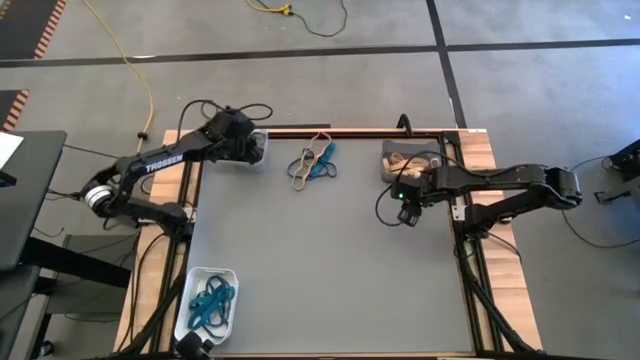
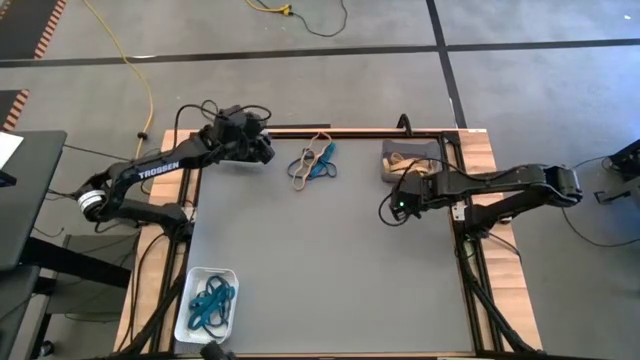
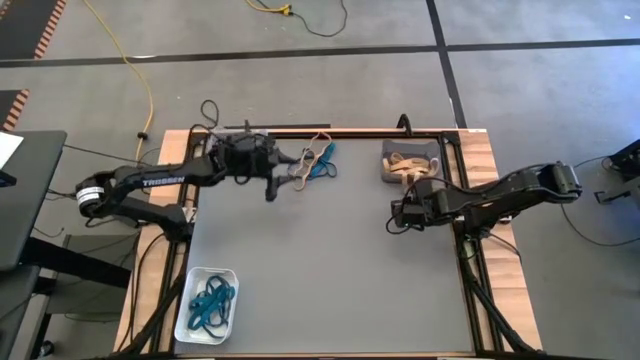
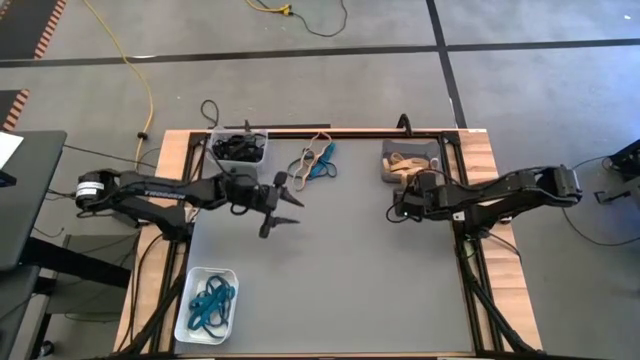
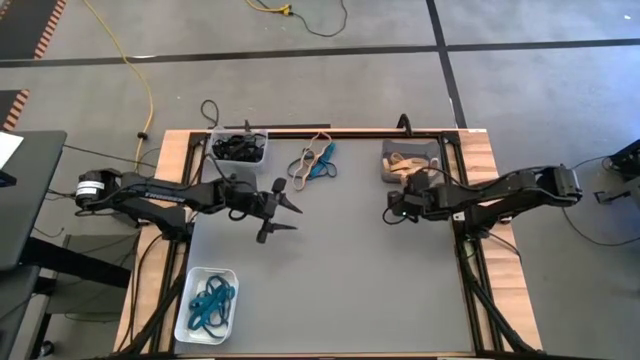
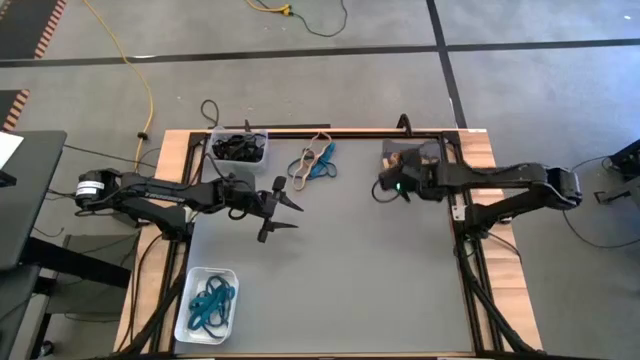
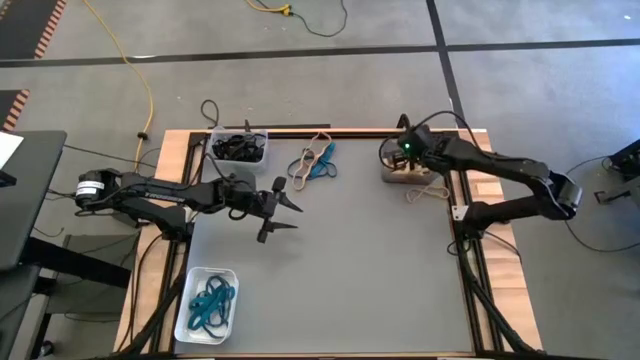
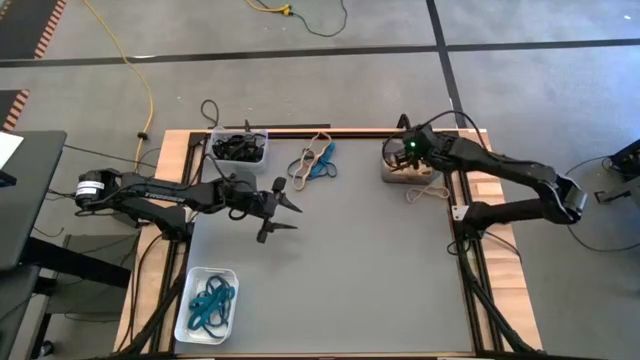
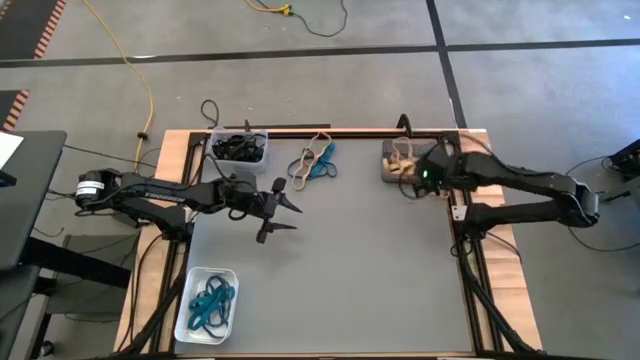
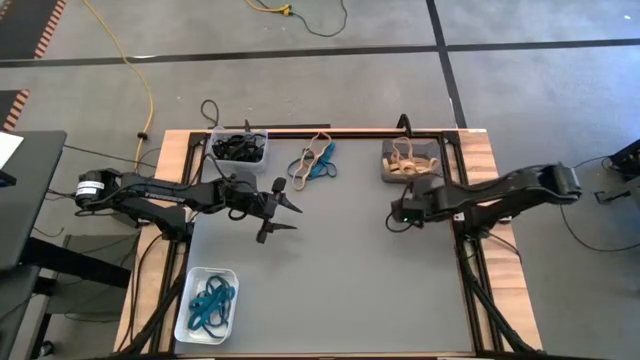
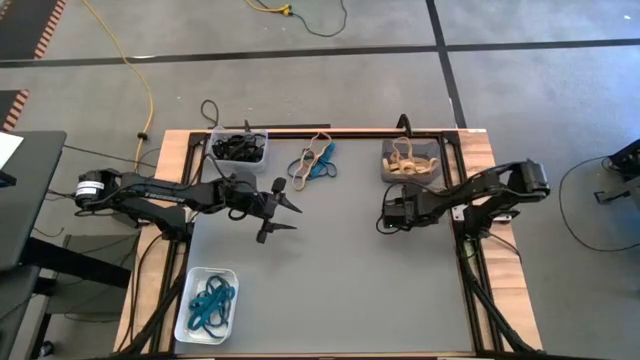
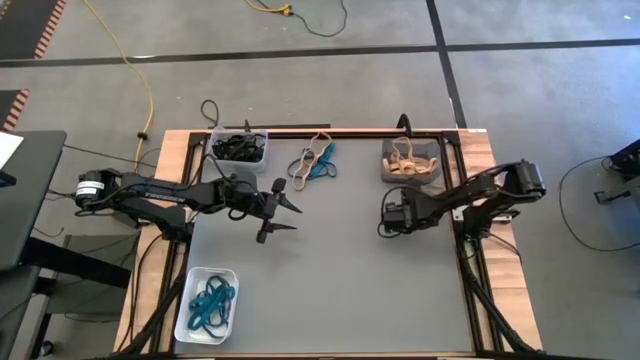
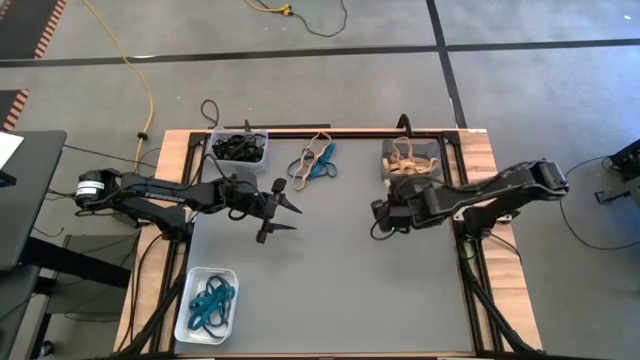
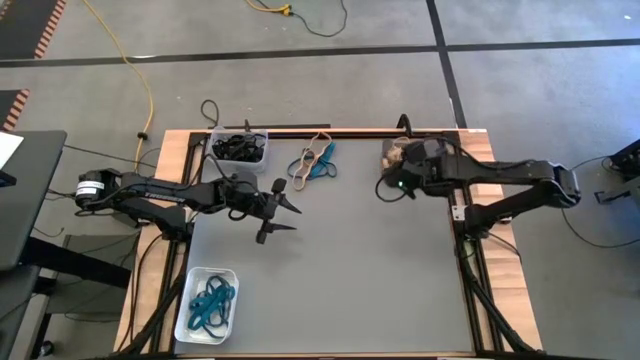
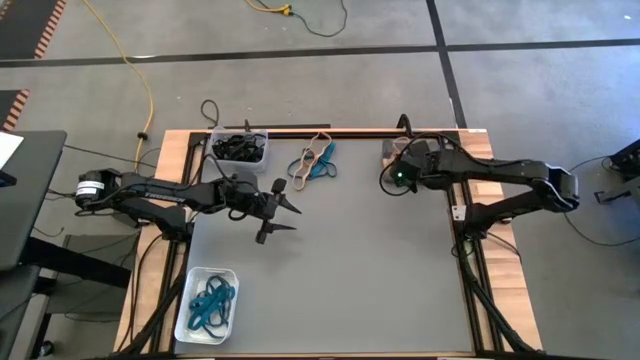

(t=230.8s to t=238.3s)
Task: Sort rubber bands into baskets
Put the white rubber band into the black transparent bin

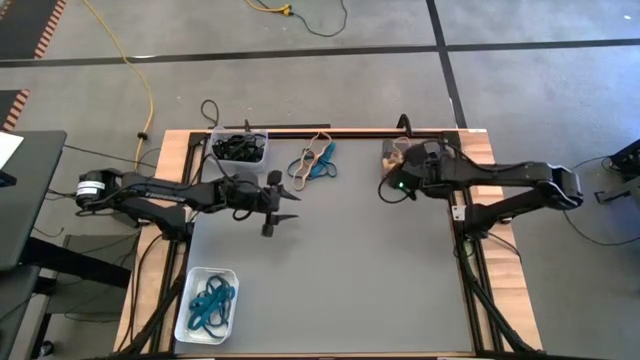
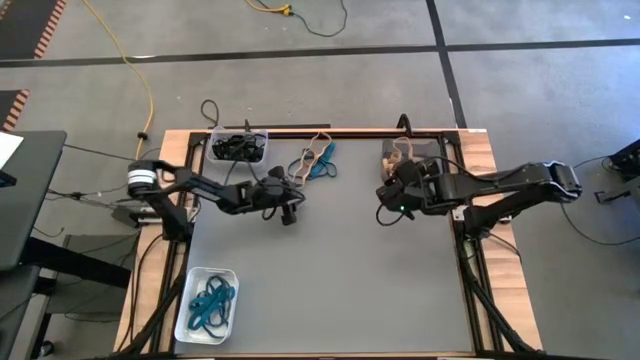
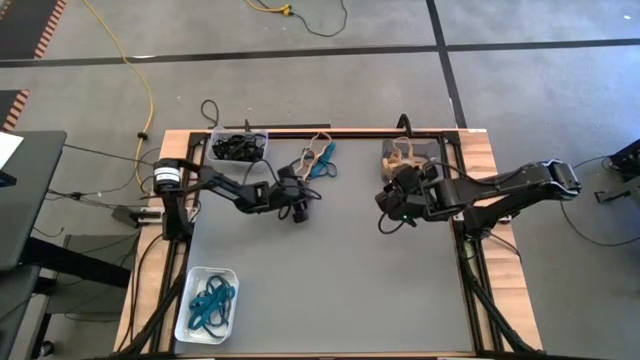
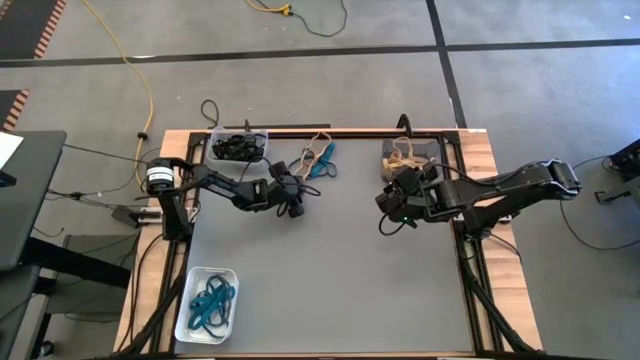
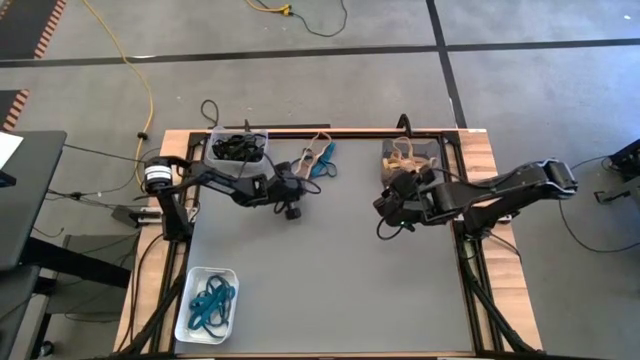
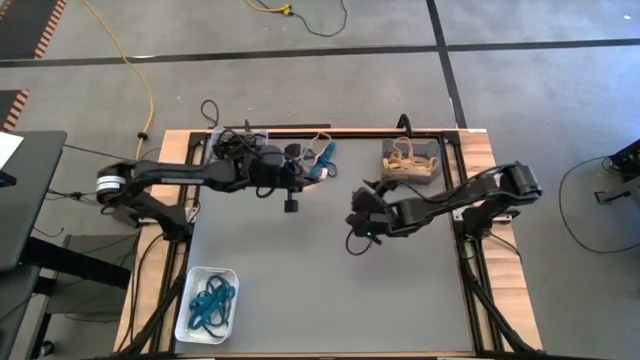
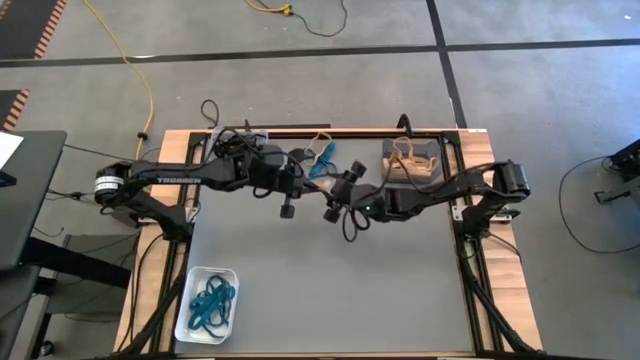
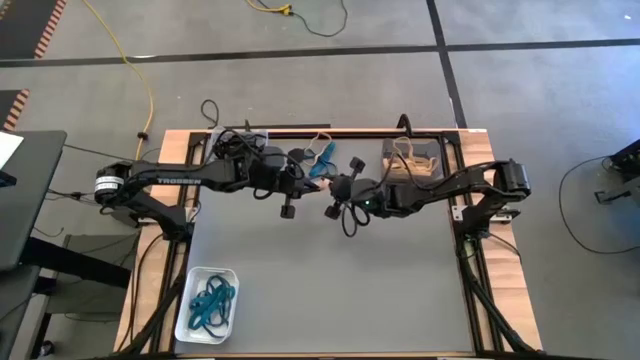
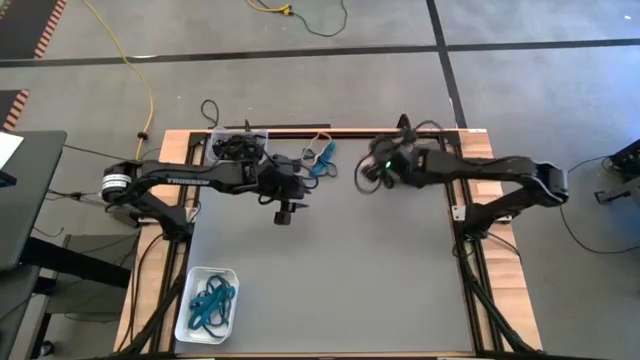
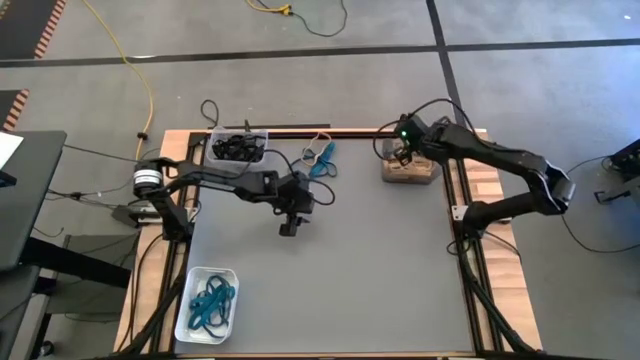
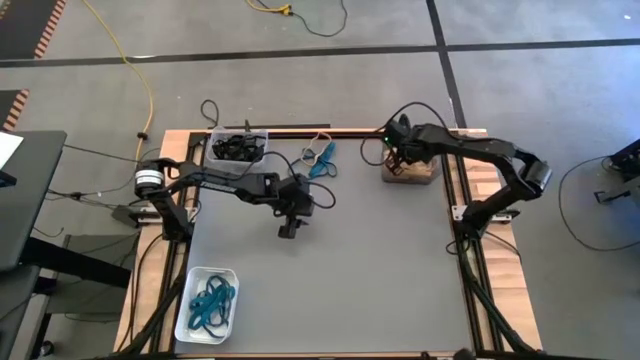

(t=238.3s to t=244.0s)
Put the white rubber band into the black transparent bin

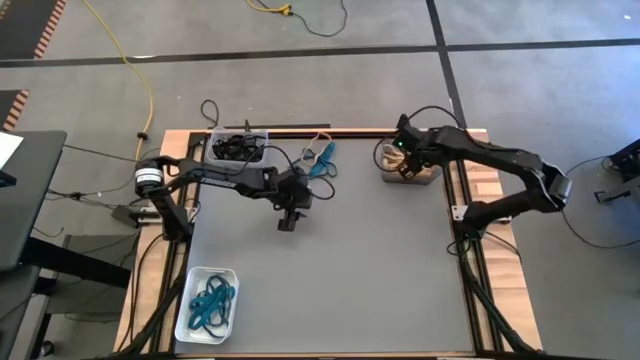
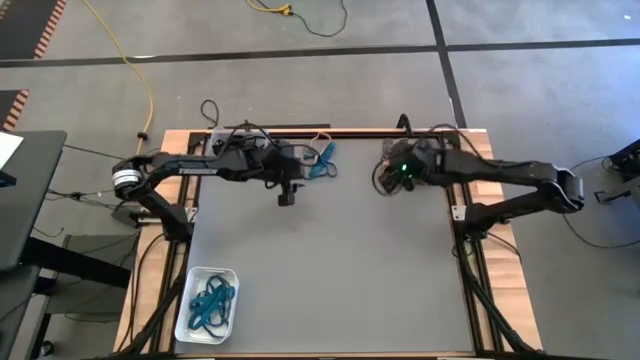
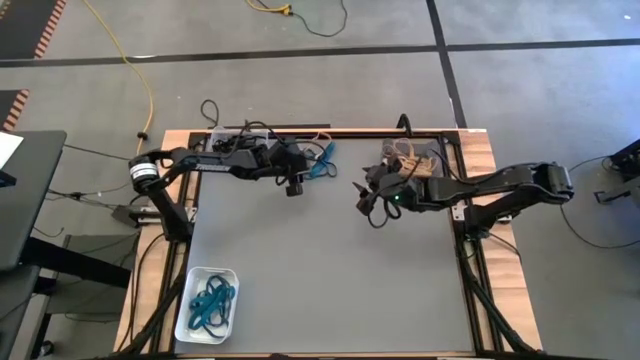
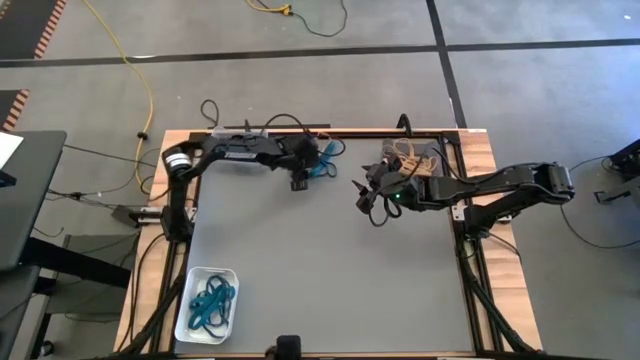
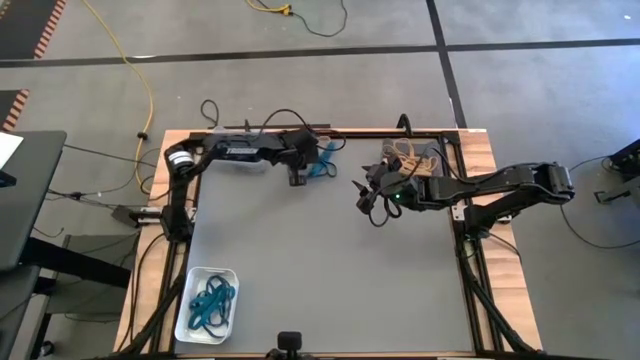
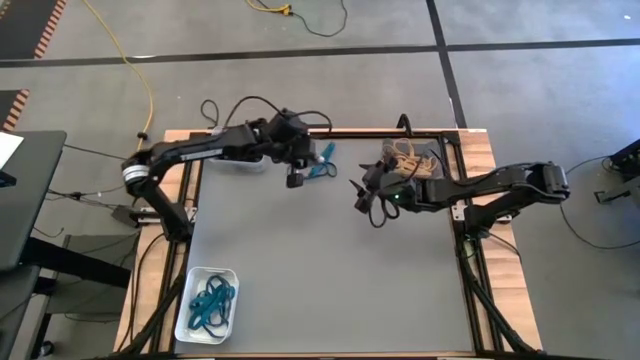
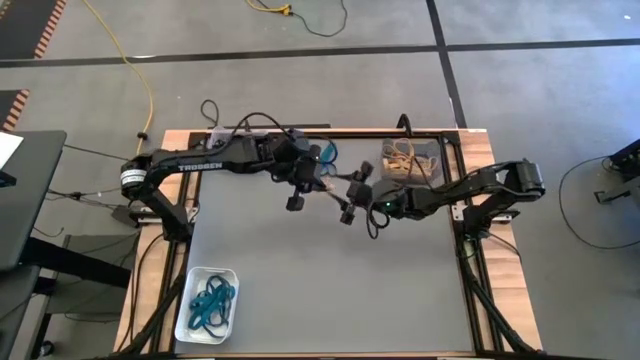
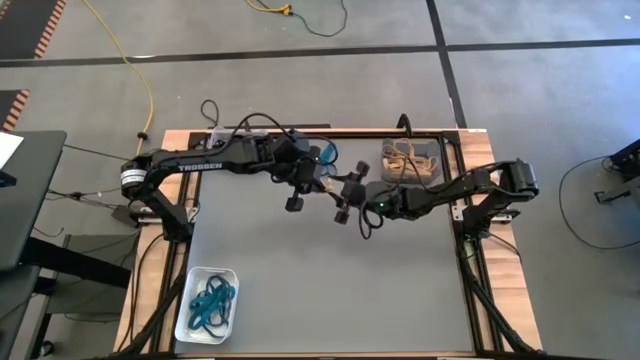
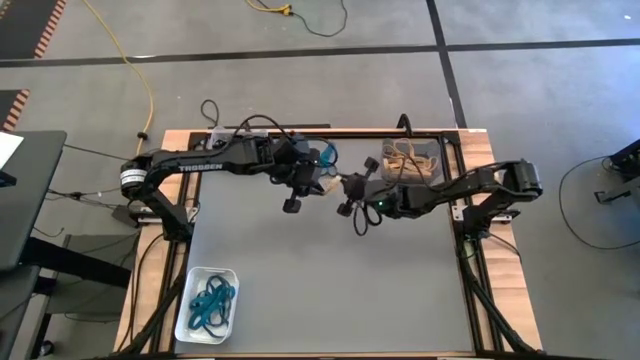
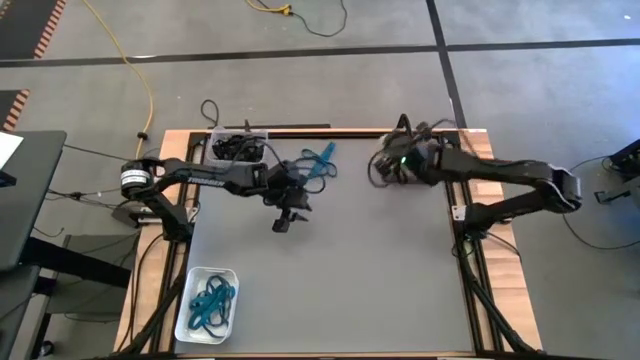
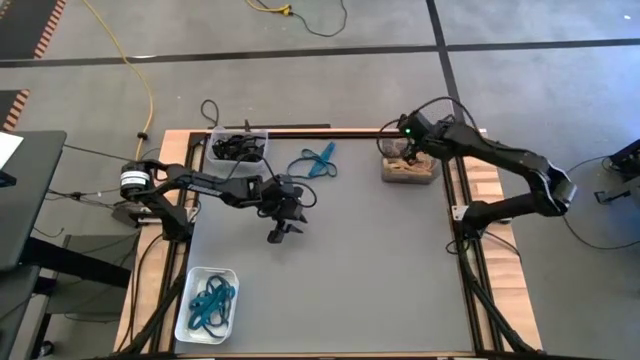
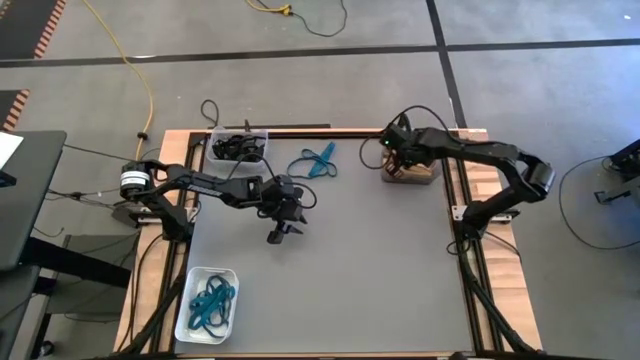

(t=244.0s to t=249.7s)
Put the white rubber band into the black transparent bin

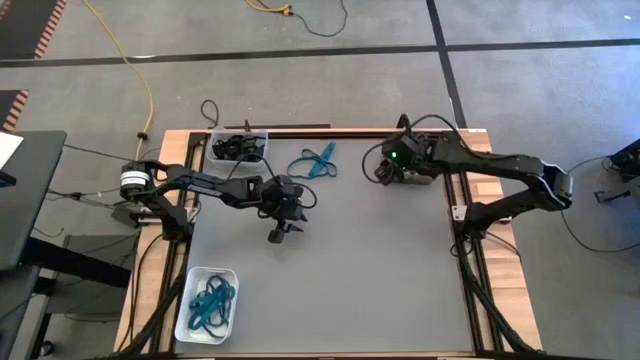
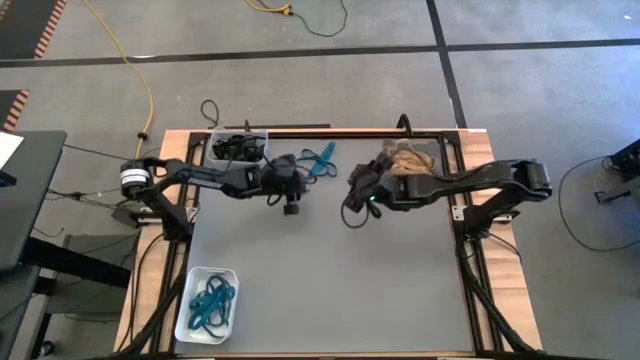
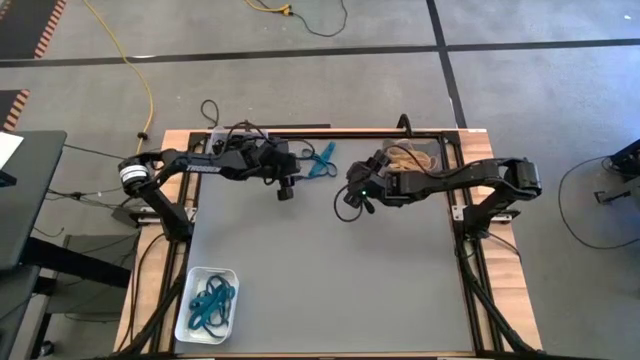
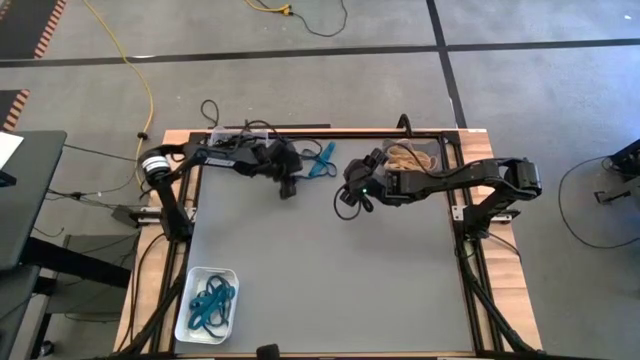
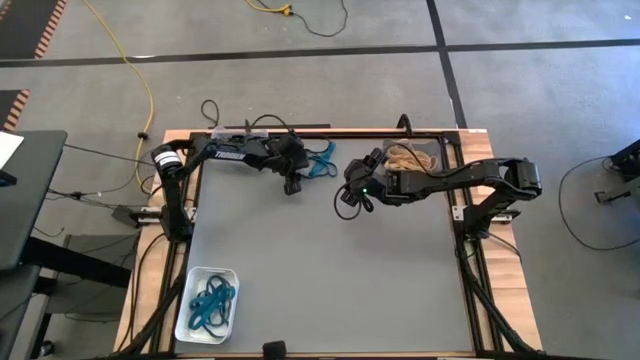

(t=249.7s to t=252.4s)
Put the blue rubber band into the white bin
